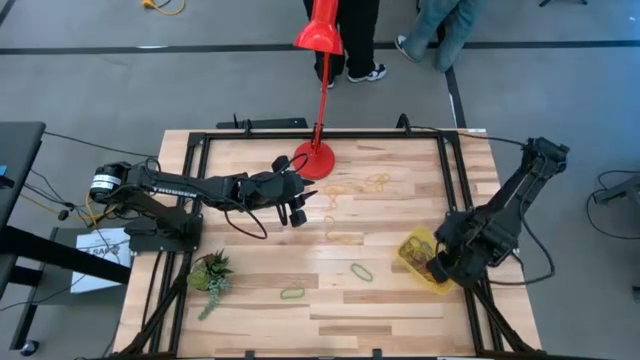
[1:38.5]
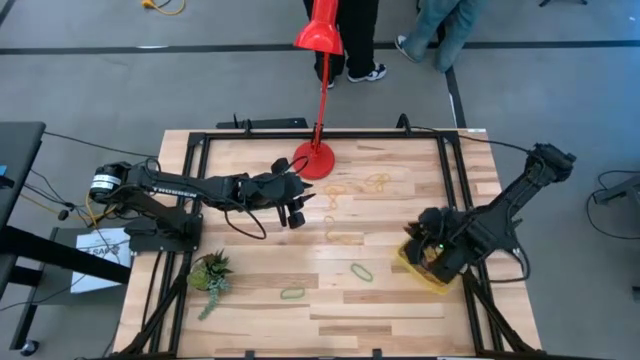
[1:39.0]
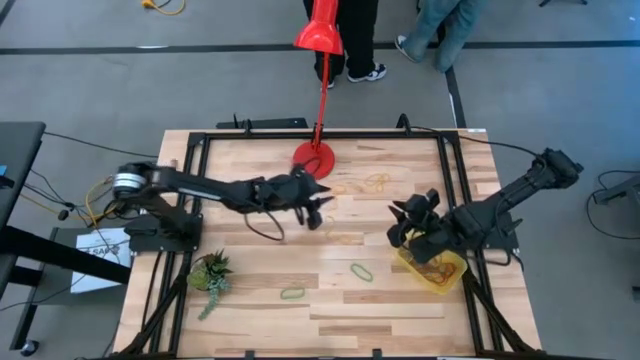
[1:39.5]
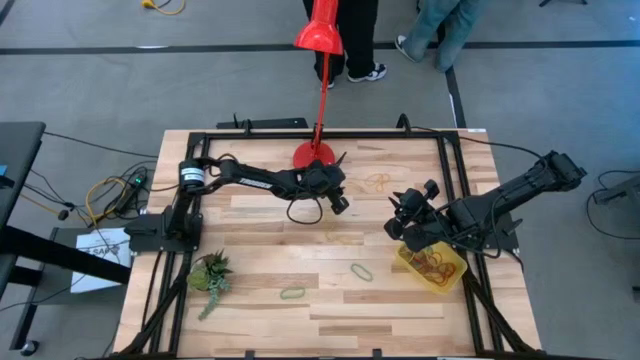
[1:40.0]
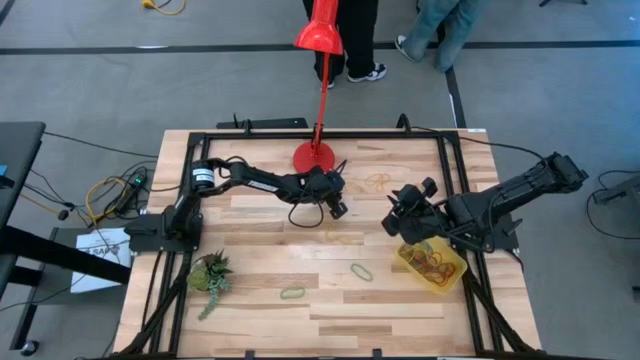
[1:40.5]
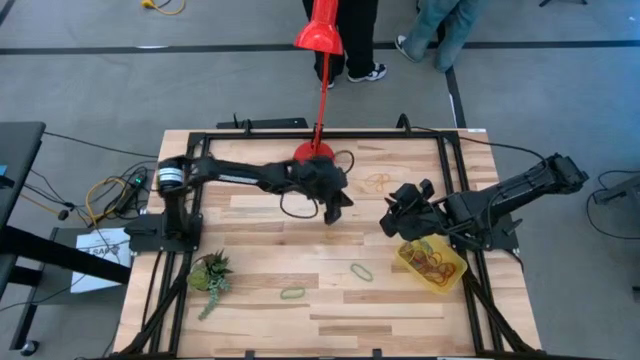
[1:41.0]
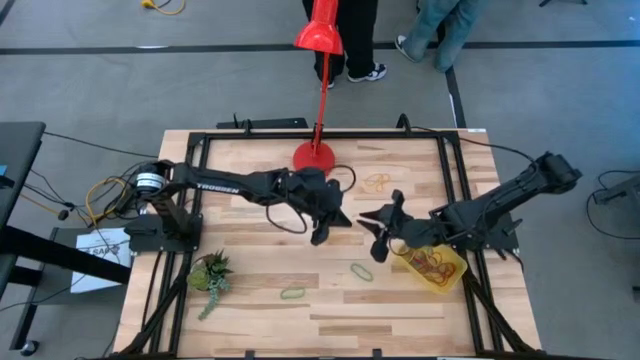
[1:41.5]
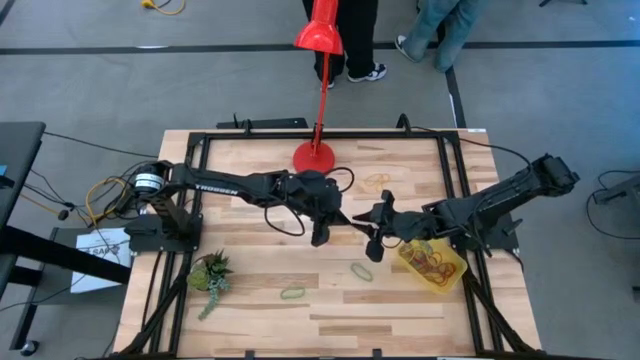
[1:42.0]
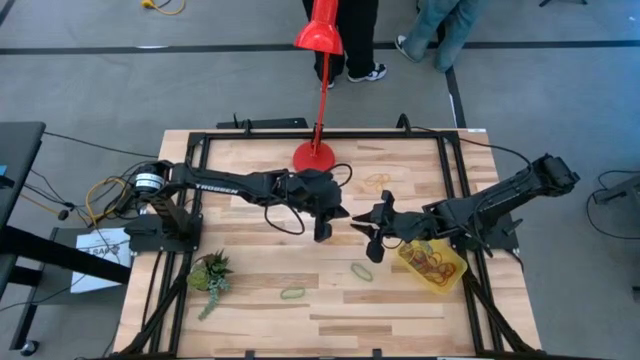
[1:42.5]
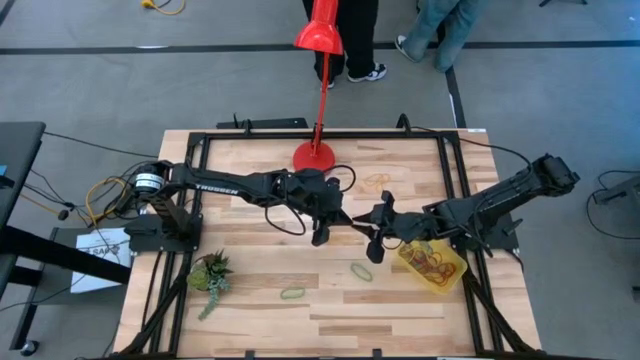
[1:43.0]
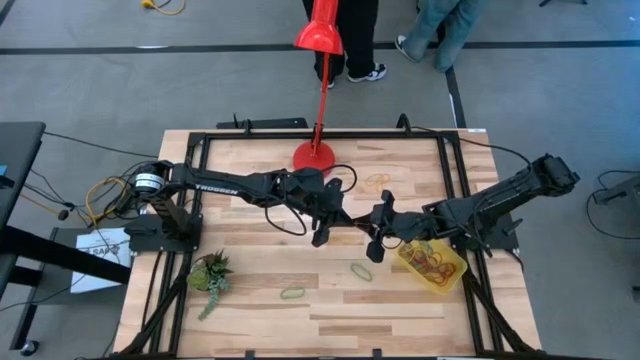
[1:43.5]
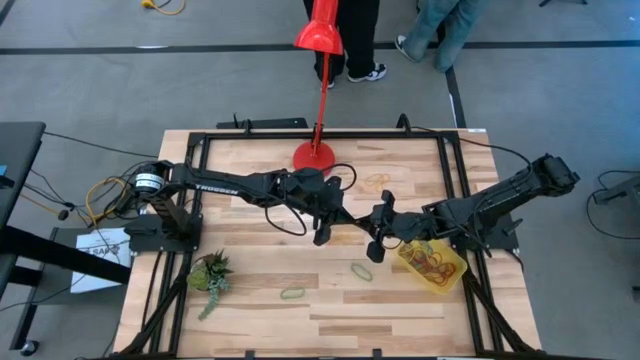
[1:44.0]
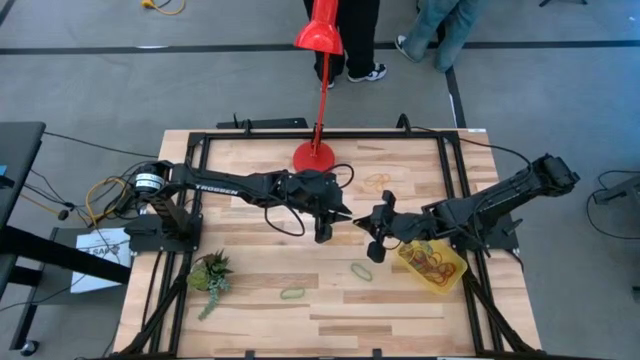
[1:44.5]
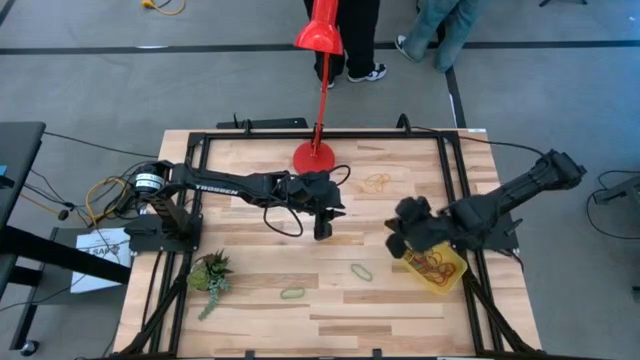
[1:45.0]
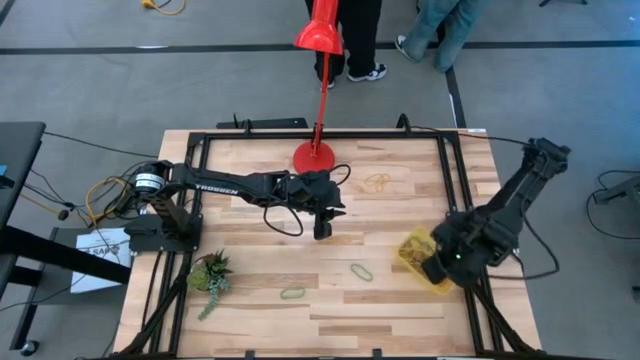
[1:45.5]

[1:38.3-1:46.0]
Task: Pick and place rubber bands into bin
Put the yellow rubber band into the container

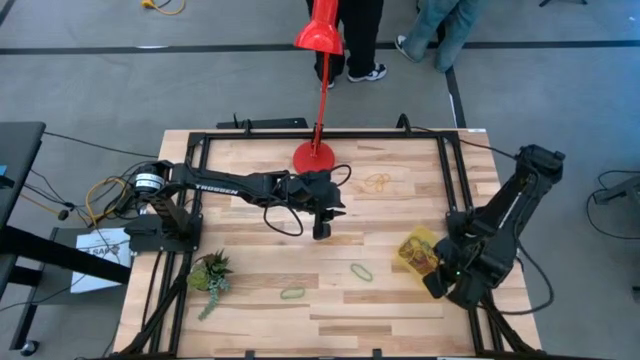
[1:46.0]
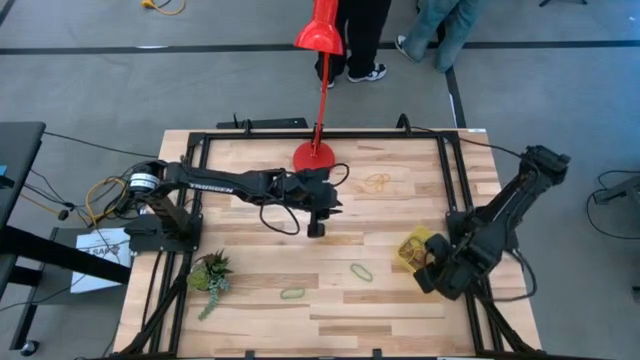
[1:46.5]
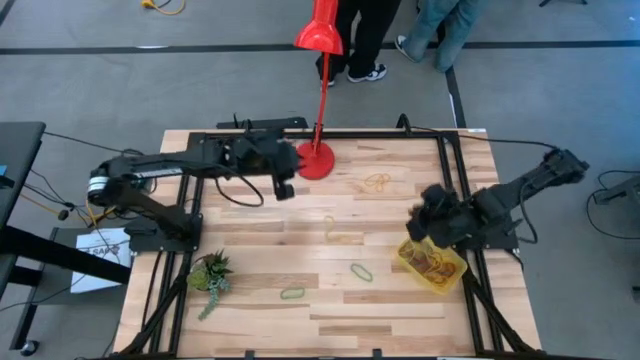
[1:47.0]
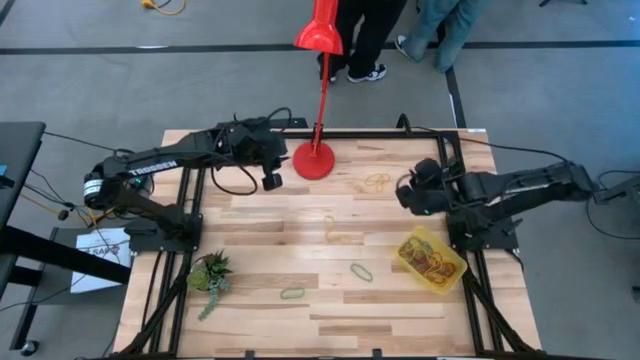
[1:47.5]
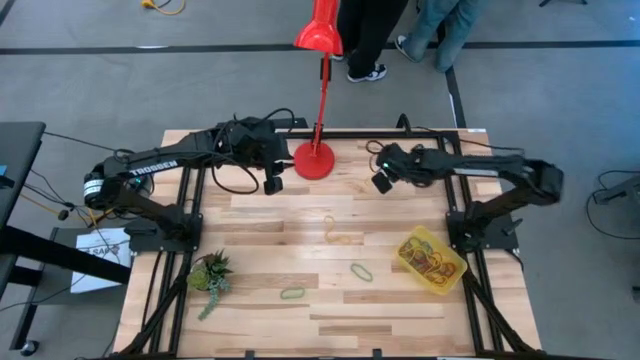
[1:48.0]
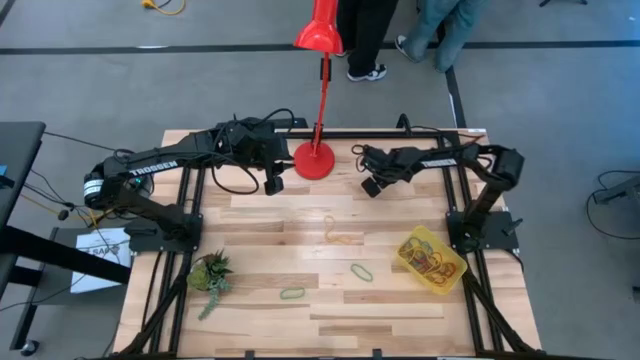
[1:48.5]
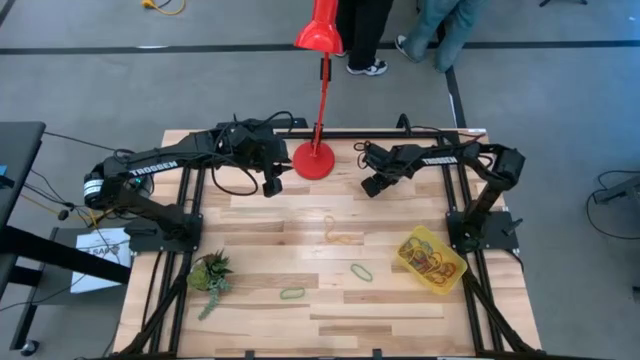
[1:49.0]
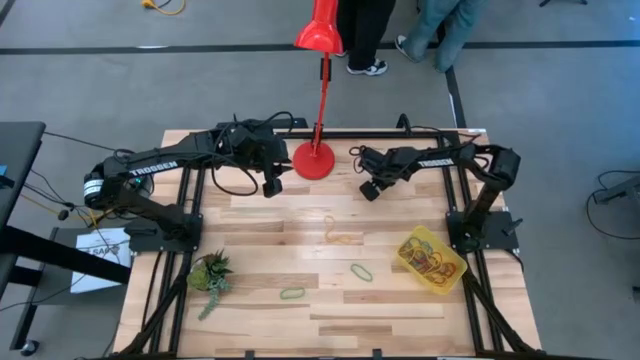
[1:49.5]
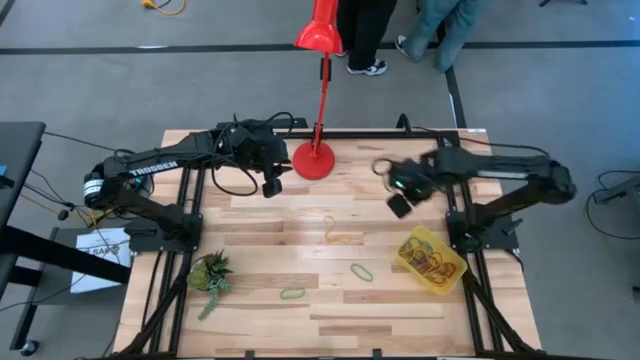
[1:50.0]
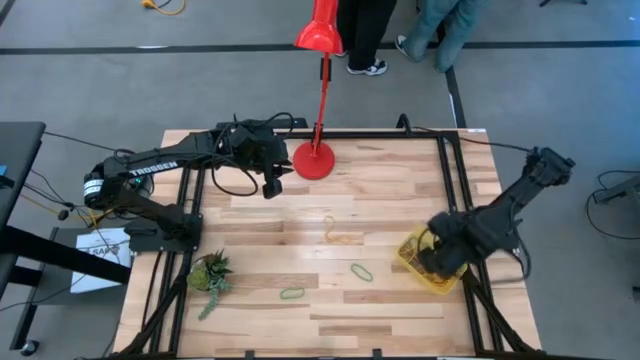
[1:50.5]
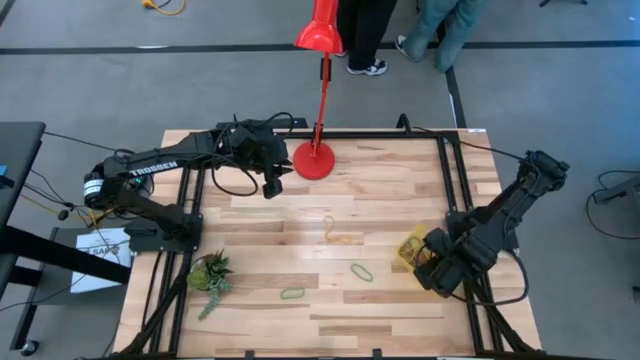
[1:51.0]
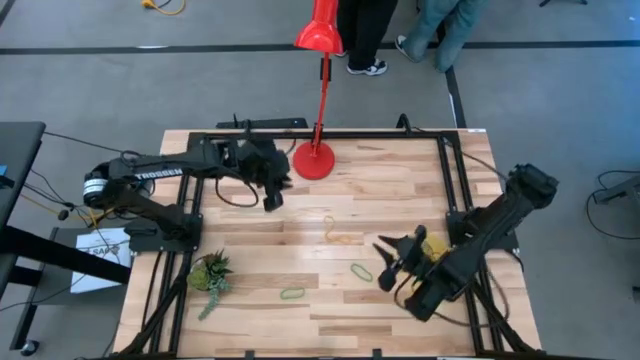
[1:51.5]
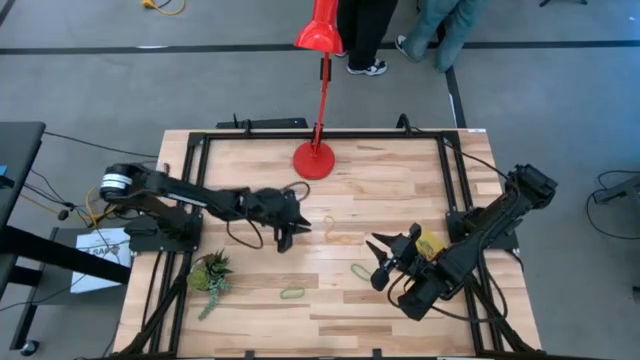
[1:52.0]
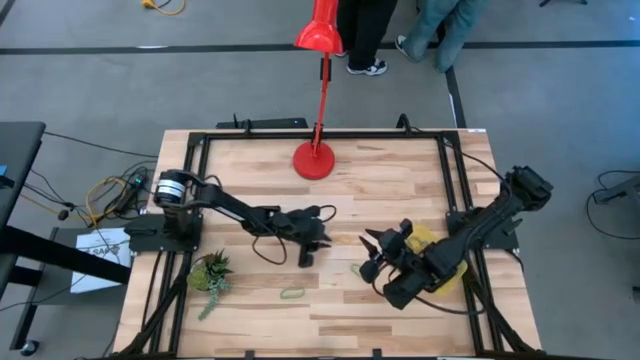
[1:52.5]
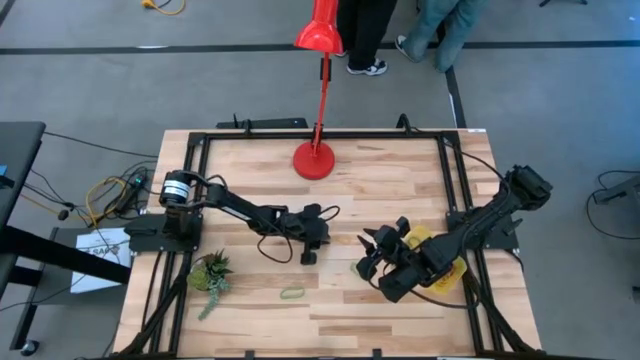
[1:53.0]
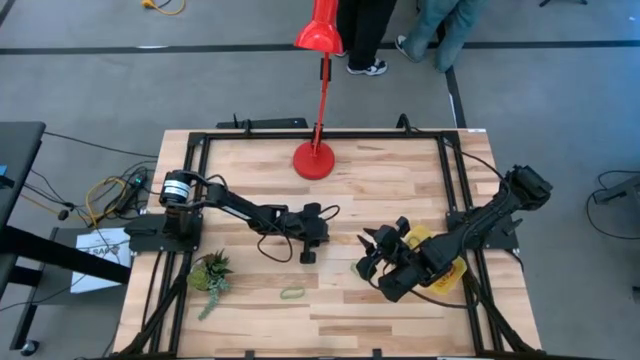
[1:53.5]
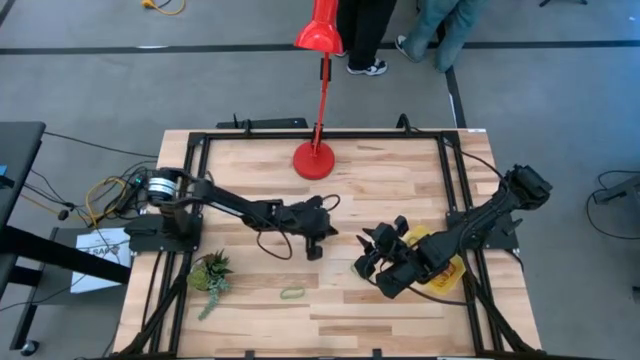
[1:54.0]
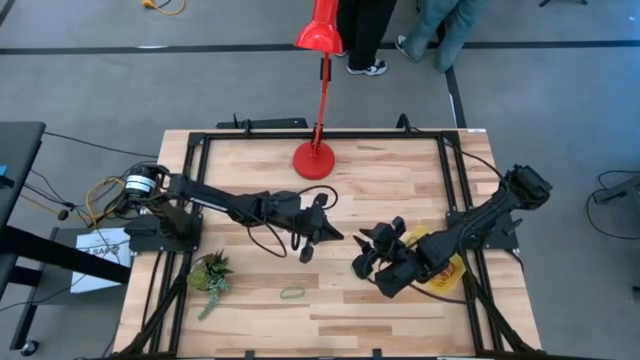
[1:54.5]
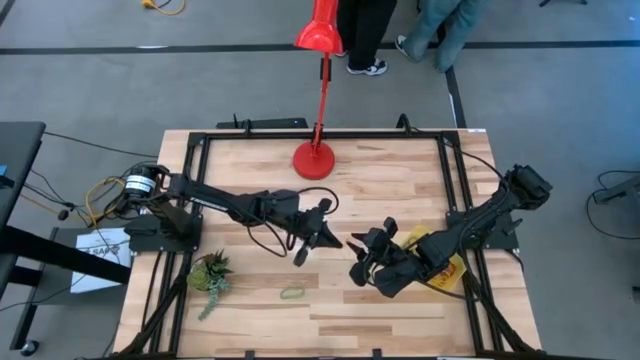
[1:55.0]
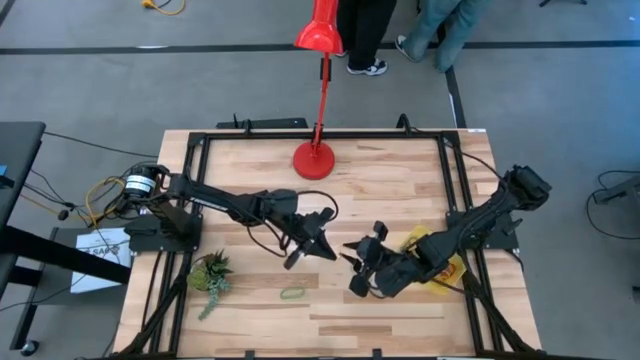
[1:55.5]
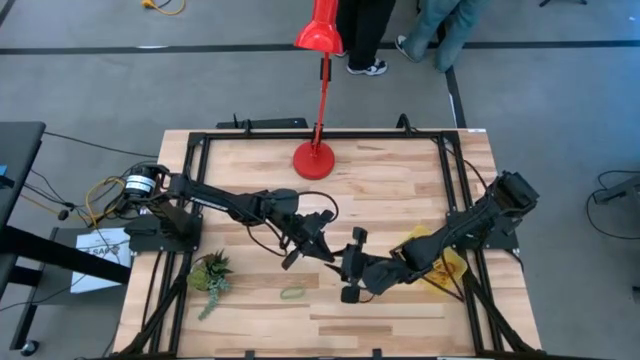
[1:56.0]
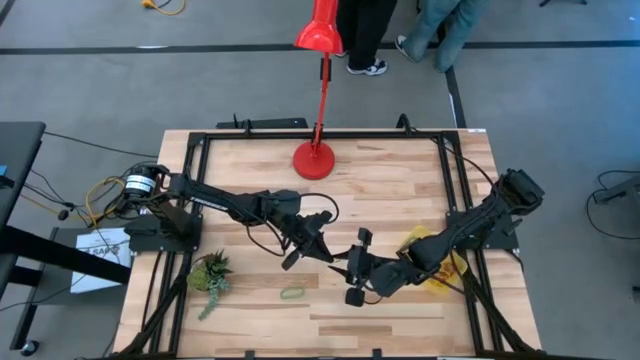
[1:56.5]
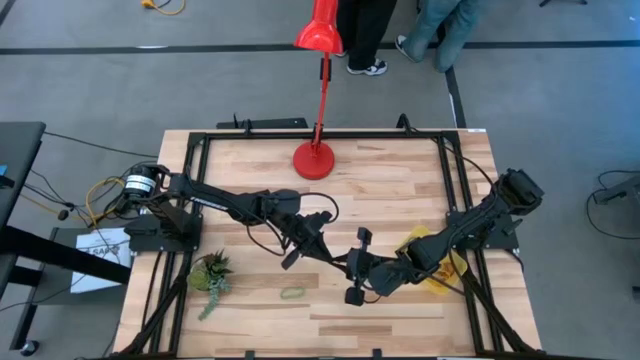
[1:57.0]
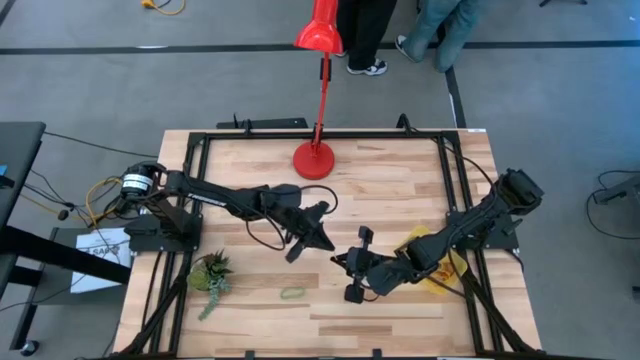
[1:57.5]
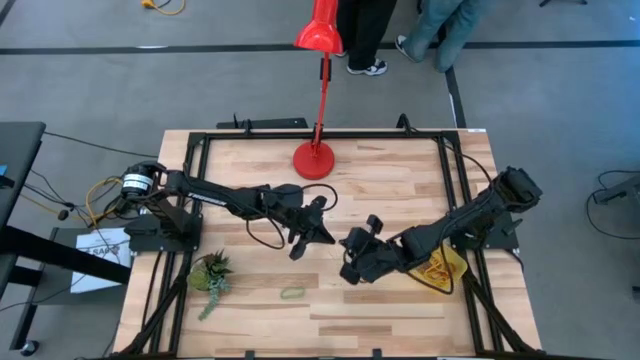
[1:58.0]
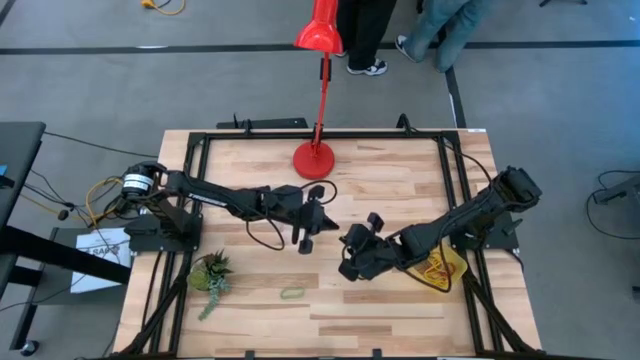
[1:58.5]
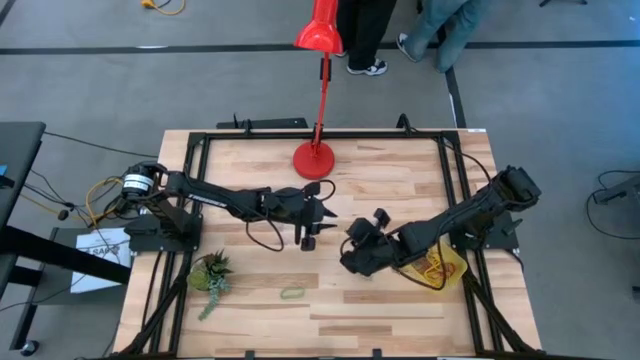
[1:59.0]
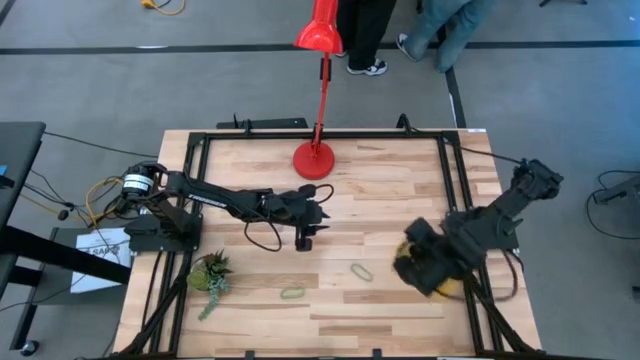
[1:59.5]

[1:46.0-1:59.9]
Put the yellow rubber band into the container

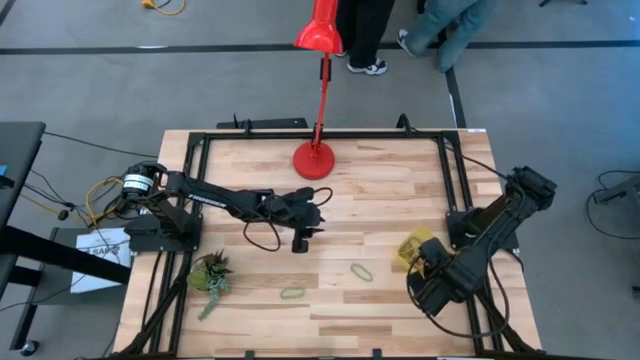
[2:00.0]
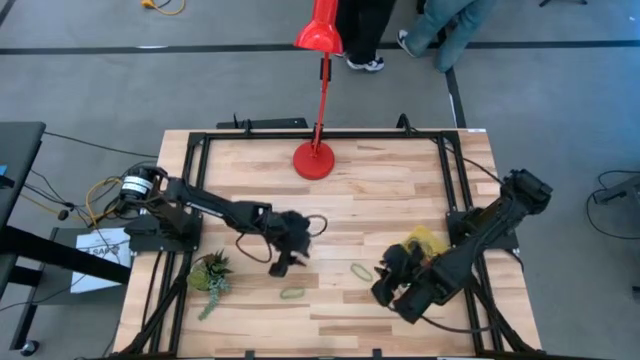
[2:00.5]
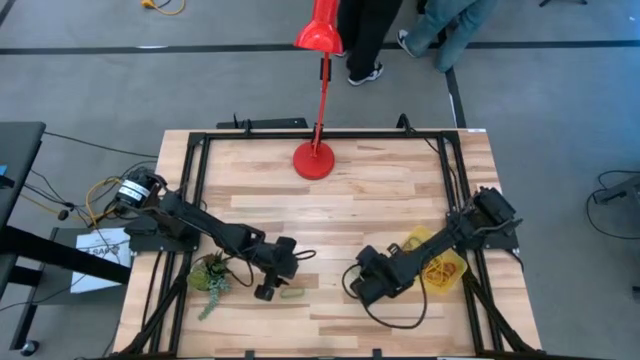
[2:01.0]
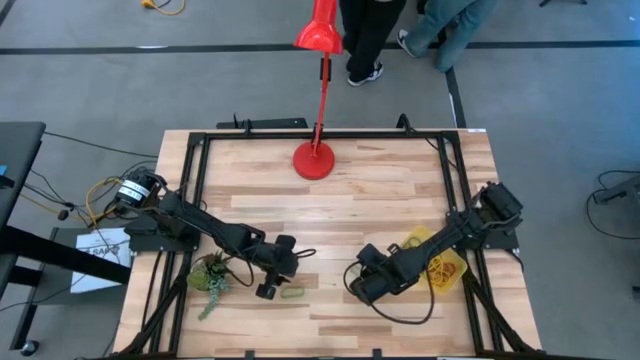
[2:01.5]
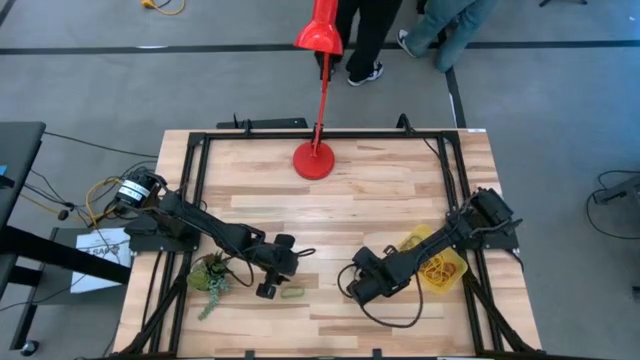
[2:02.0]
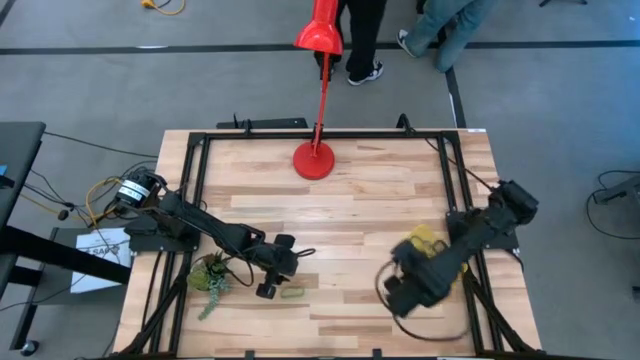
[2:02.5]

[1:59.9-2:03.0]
Put the green rubber band into the container
